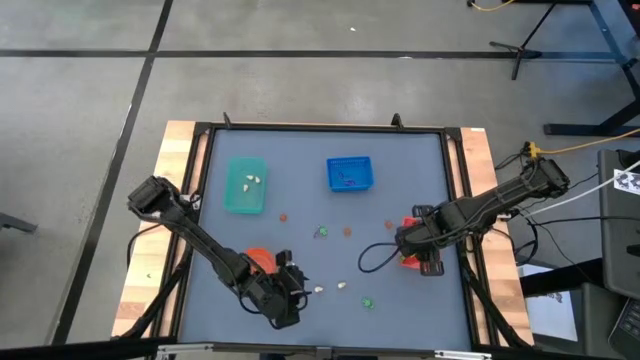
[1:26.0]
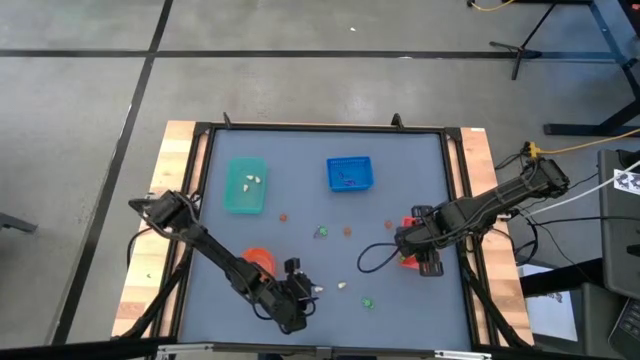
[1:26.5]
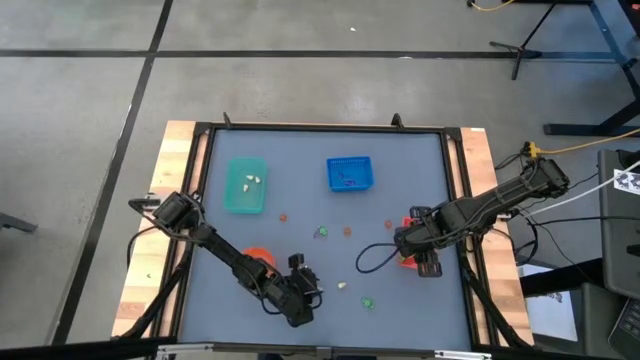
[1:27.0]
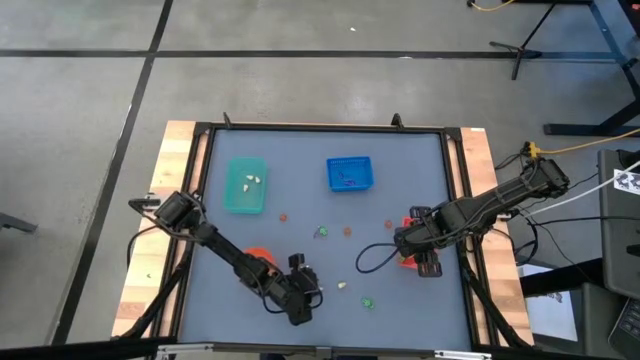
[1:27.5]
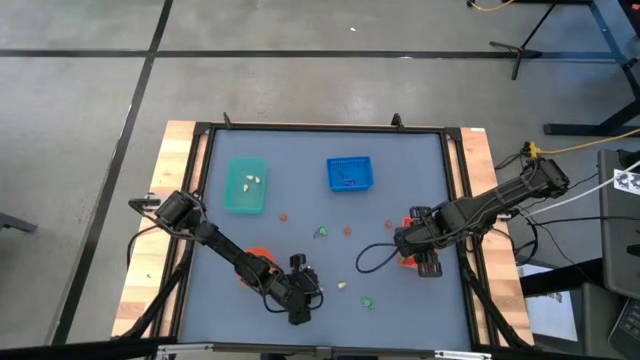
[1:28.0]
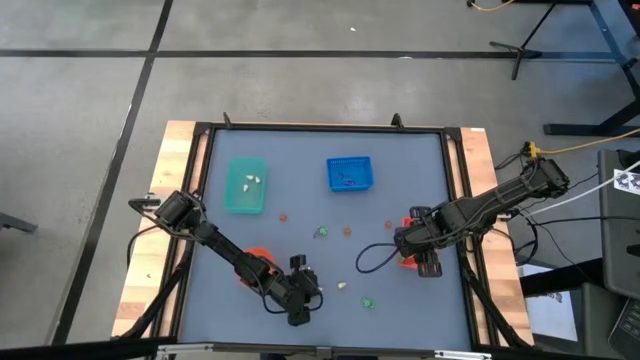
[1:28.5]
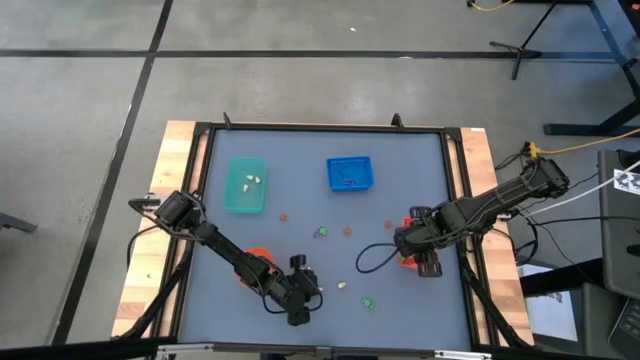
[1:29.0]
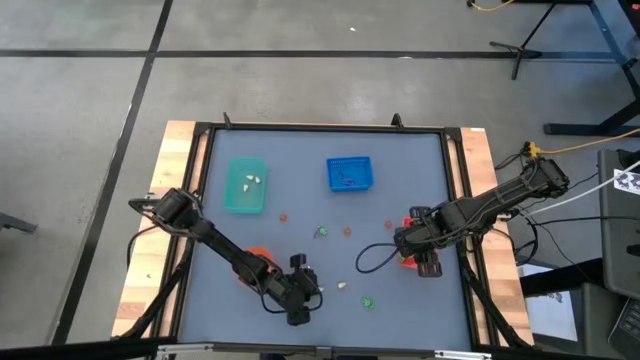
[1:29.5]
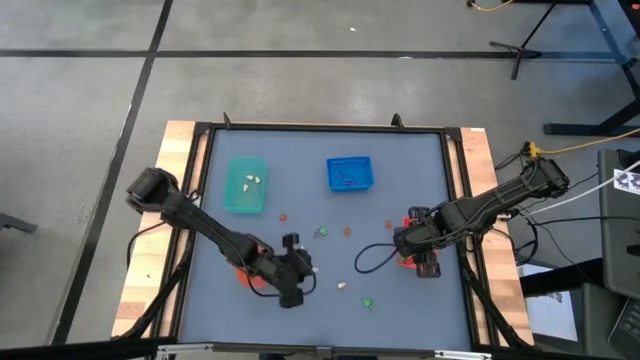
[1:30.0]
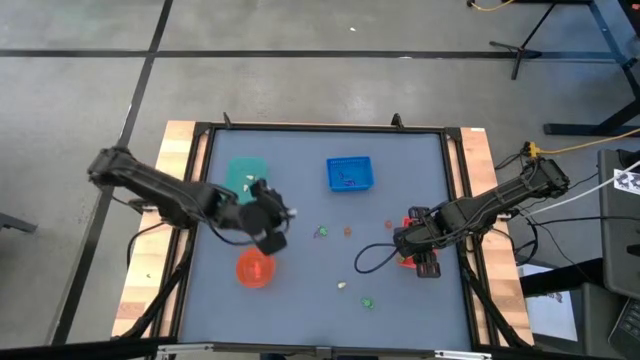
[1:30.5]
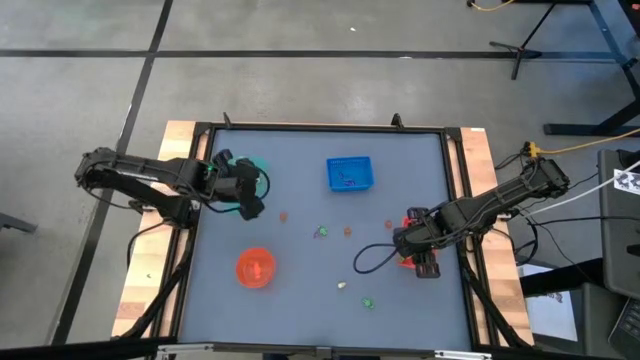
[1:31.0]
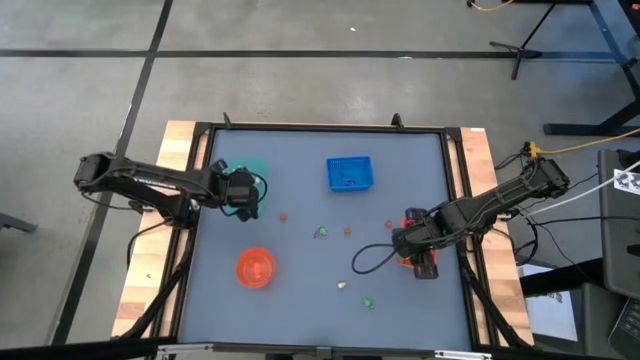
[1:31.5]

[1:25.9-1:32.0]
Task: Sort Halloween decoration
Put the white skull toy into the green bin

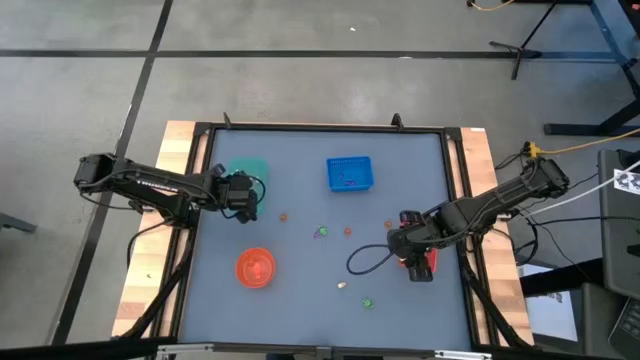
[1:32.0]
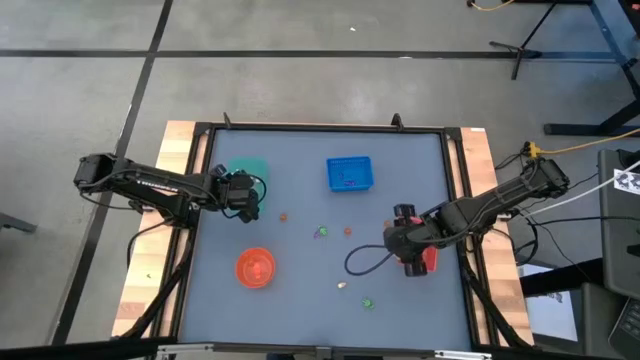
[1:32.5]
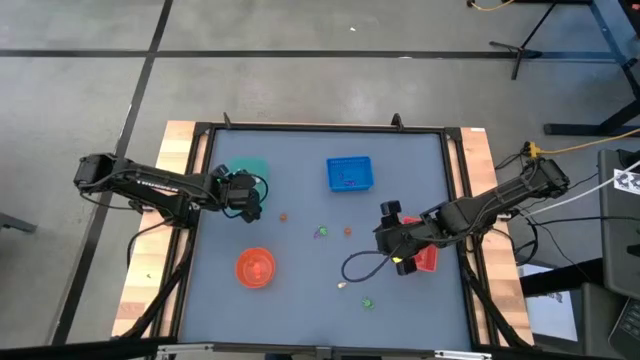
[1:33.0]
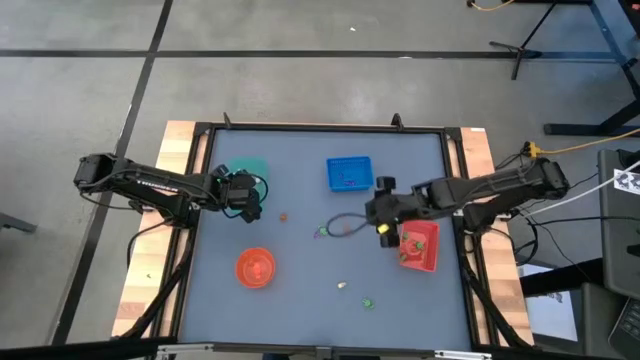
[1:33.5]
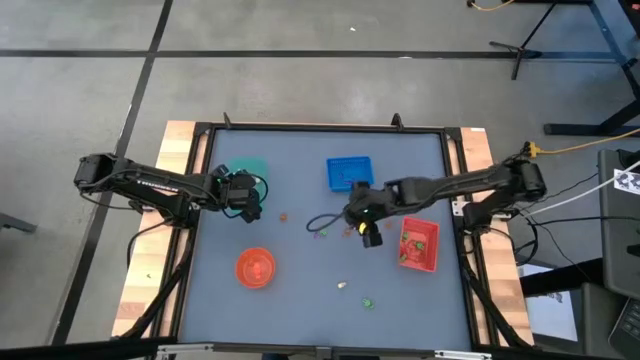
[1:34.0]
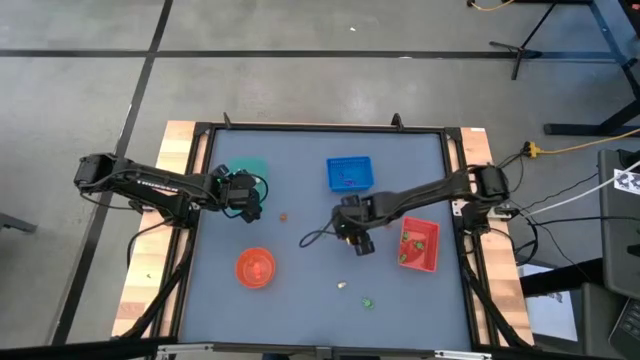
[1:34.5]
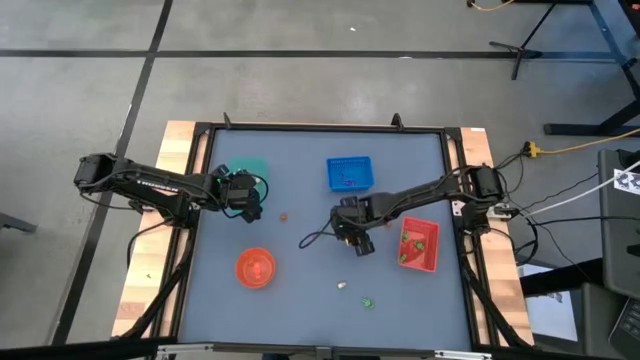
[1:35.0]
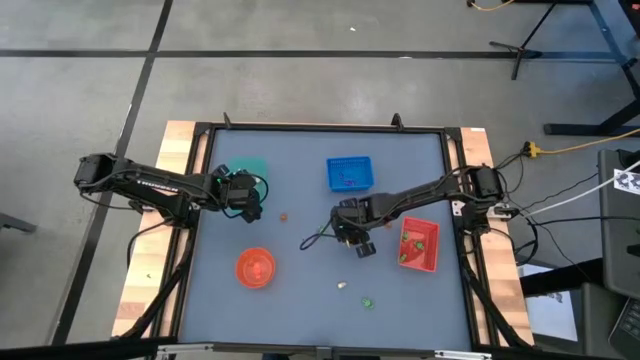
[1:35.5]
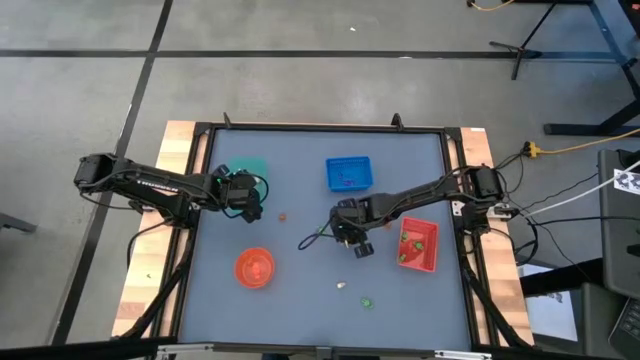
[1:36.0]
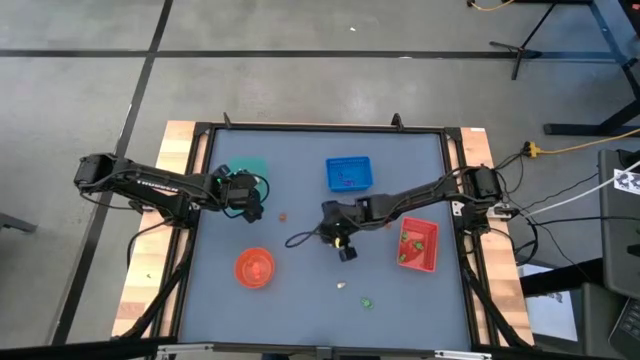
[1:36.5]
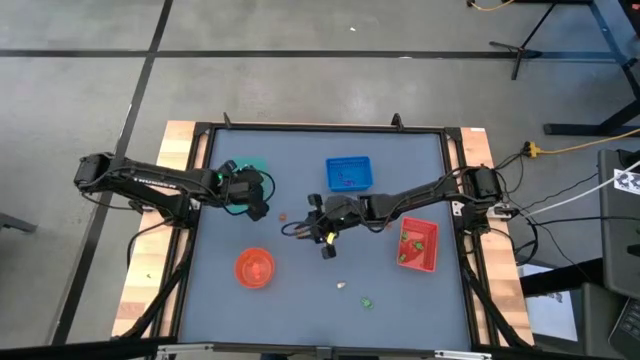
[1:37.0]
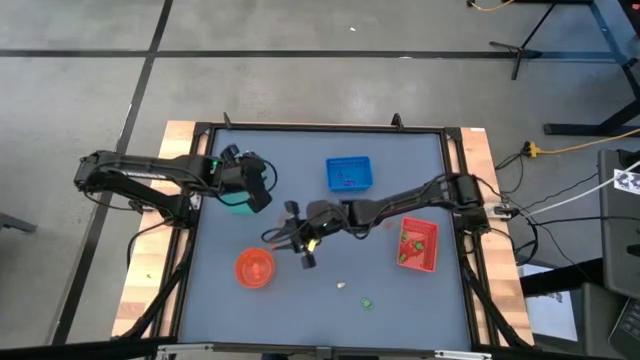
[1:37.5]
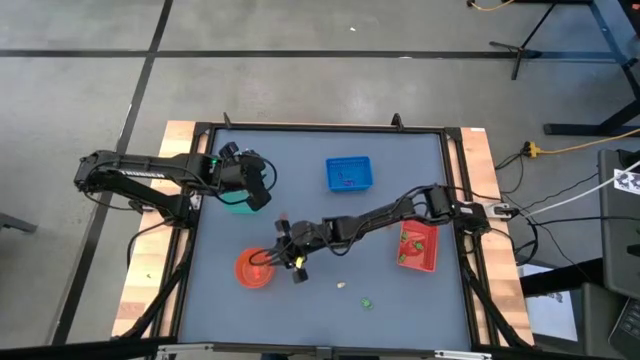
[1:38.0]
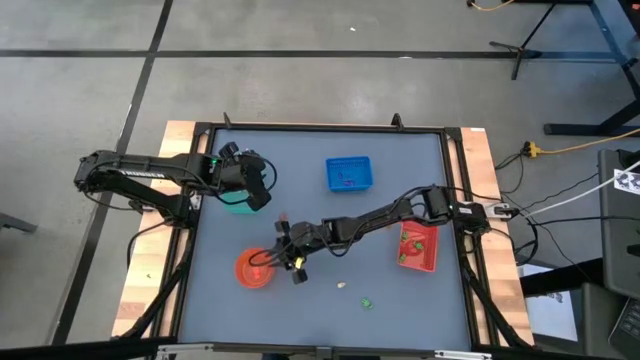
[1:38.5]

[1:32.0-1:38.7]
Put the orange pumpkin toy into the orange bowl

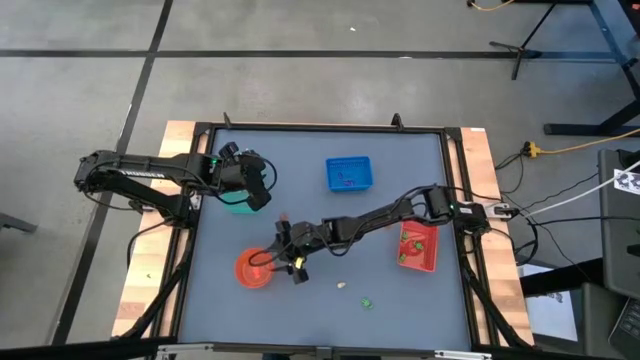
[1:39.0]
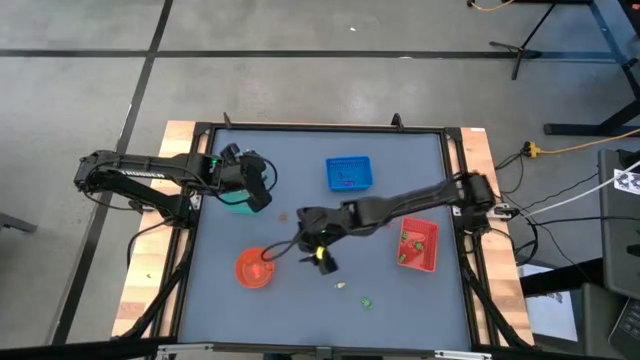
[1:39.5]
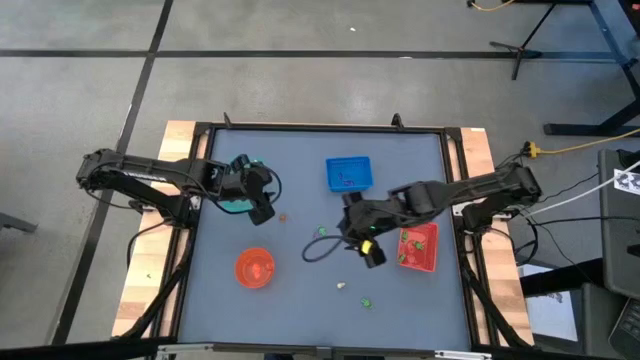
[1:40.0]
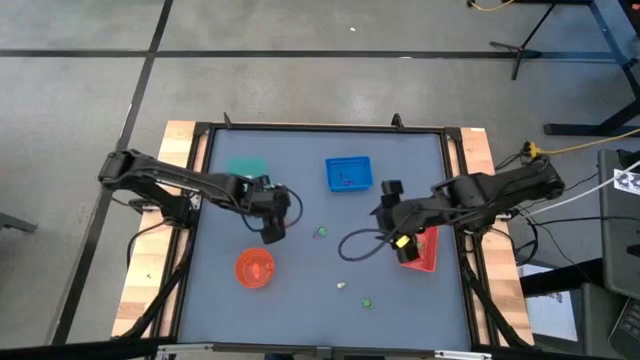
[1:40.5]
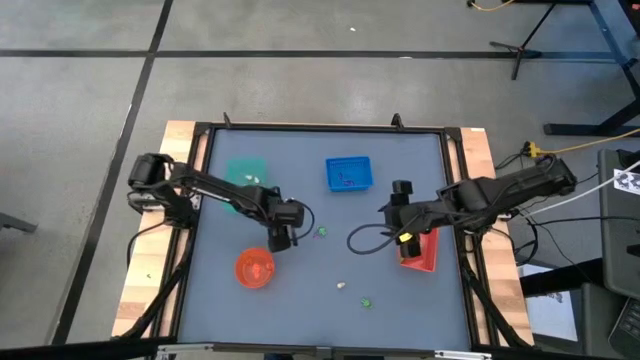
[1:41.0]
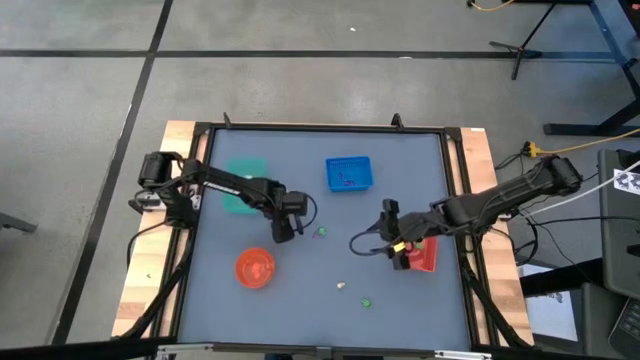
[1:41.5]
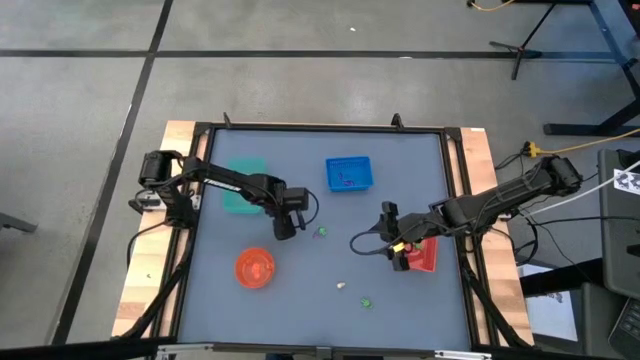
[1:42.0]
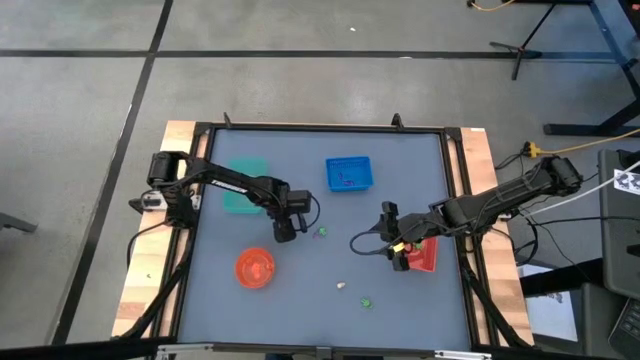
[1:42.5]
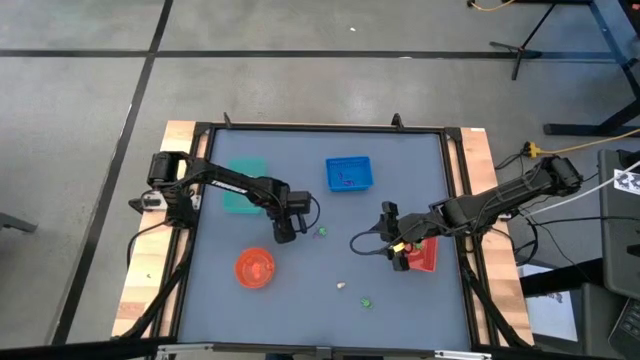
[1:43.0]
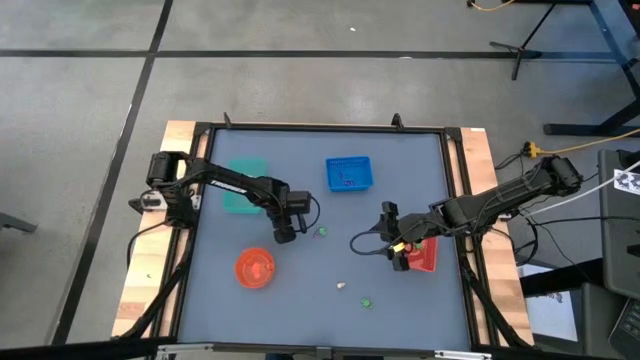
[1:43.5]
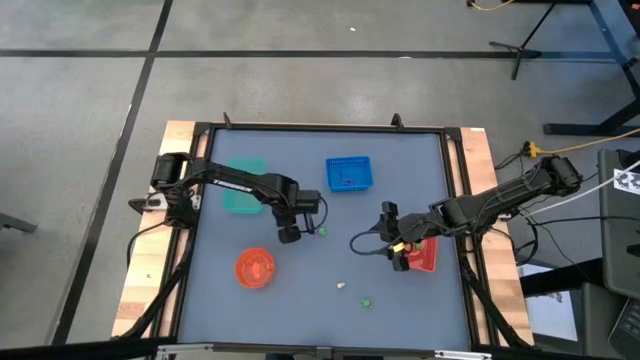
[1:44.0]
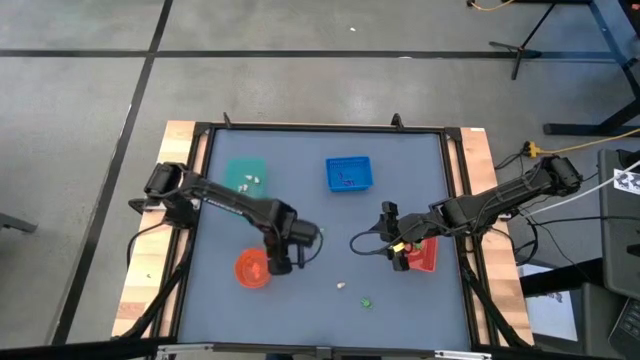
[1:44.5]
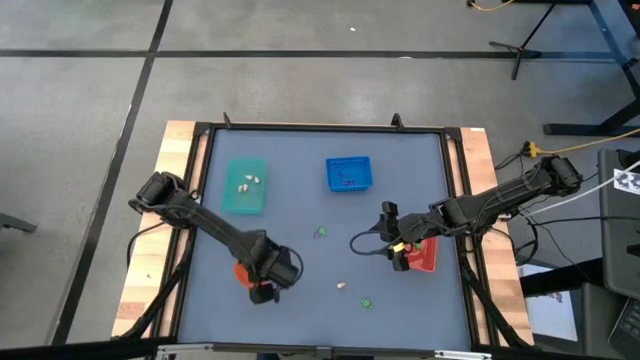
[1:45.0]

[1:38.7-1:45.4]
Put the orange pumpkin toy into the orange bowl
